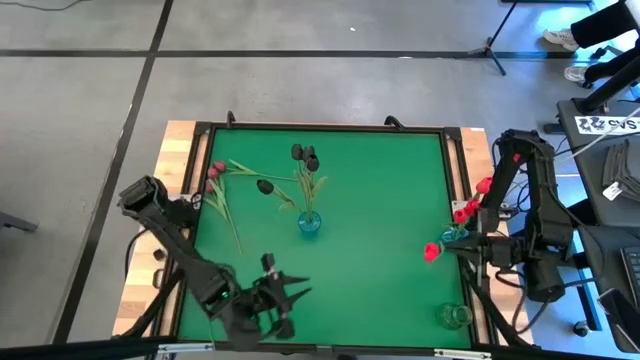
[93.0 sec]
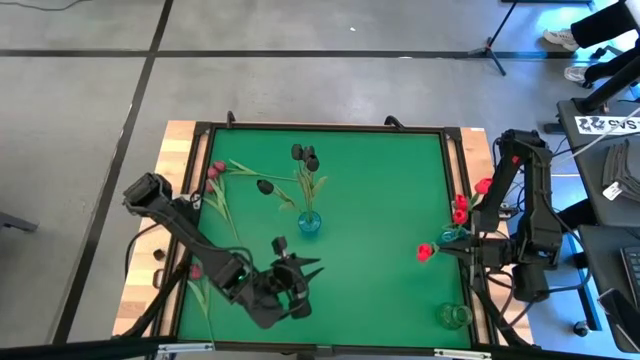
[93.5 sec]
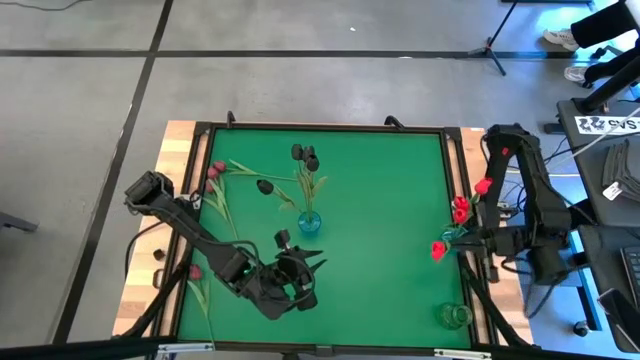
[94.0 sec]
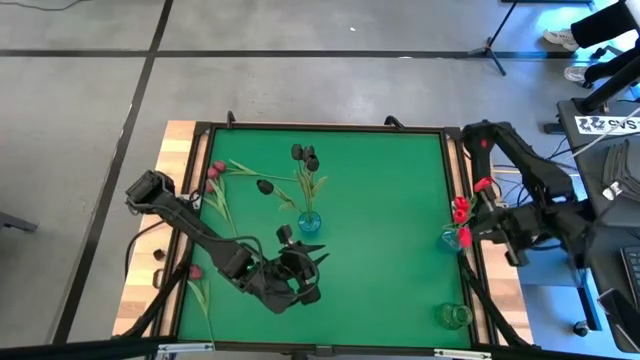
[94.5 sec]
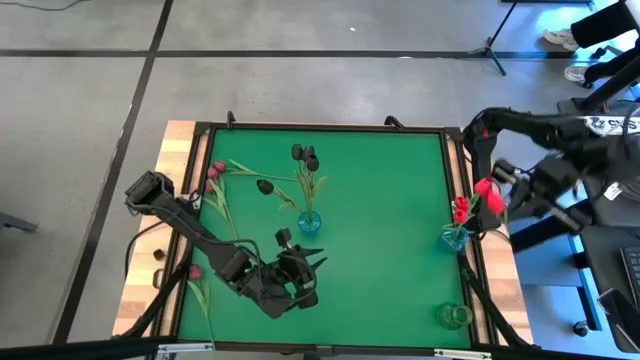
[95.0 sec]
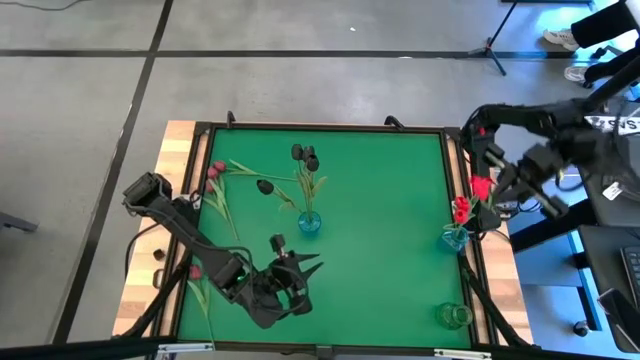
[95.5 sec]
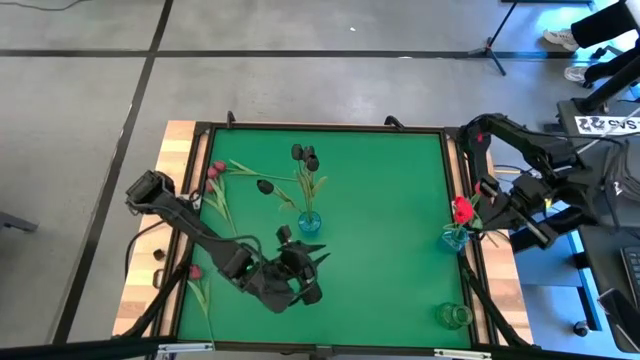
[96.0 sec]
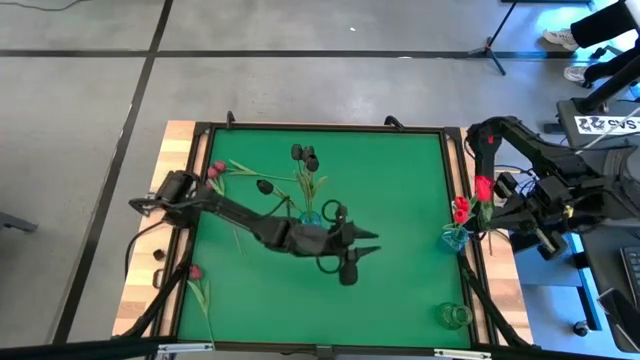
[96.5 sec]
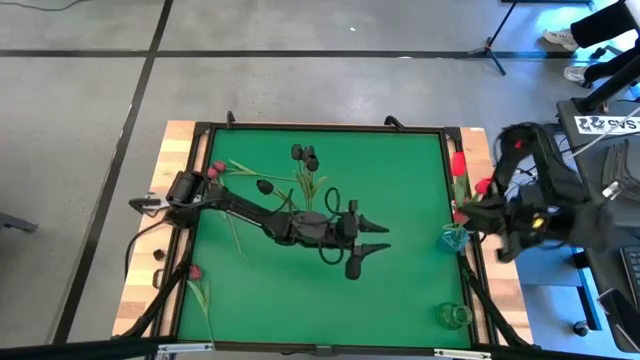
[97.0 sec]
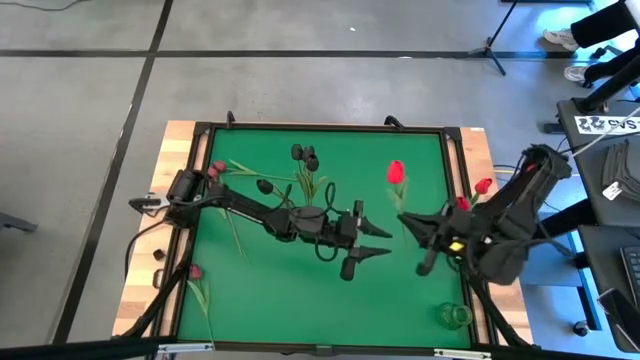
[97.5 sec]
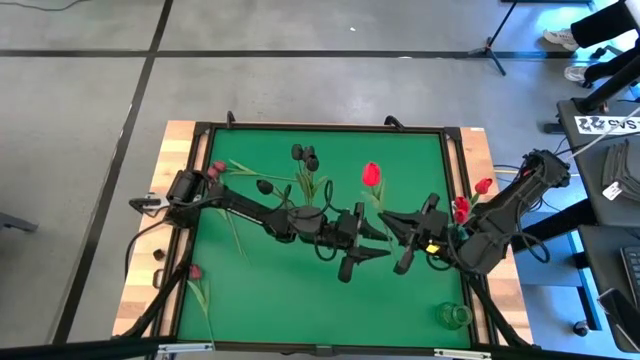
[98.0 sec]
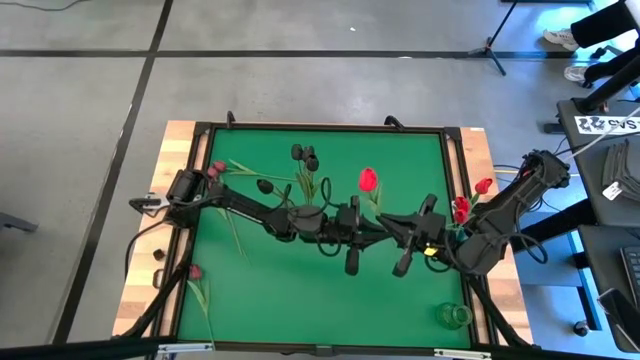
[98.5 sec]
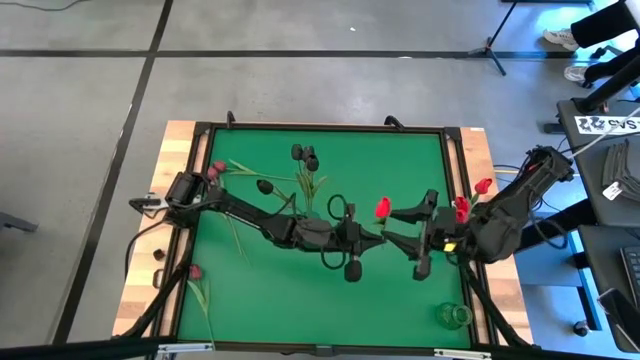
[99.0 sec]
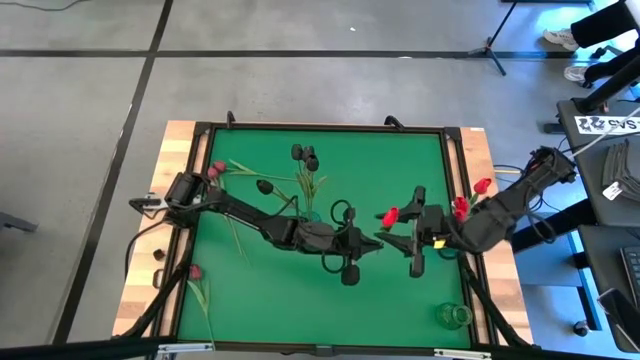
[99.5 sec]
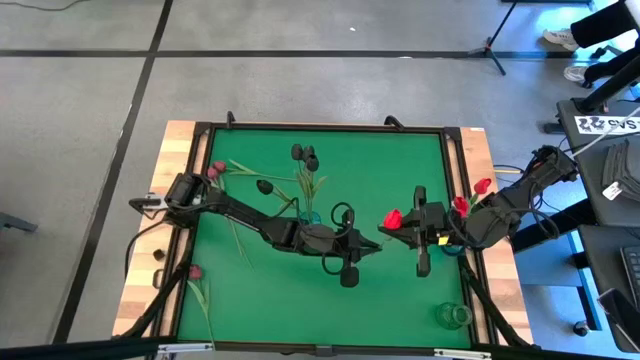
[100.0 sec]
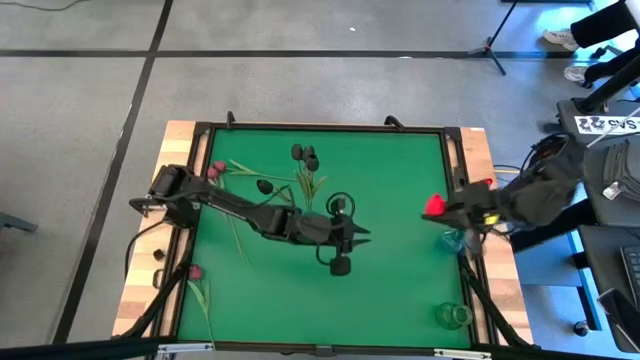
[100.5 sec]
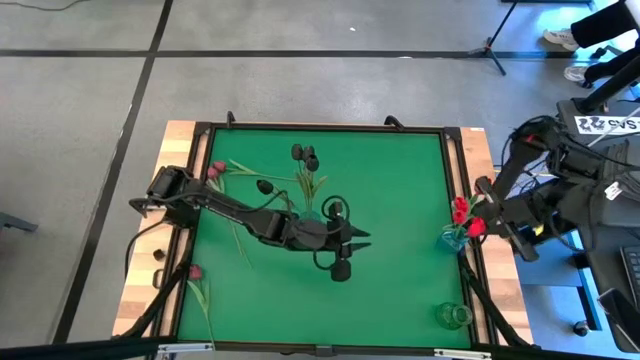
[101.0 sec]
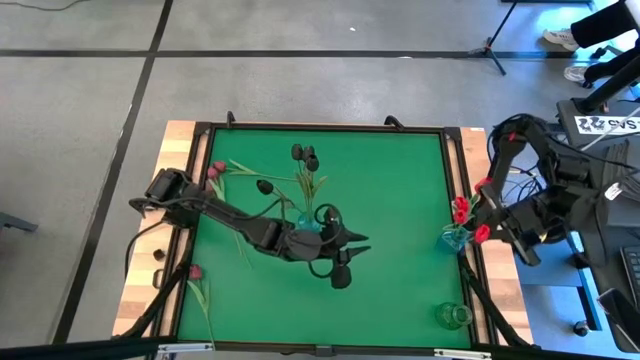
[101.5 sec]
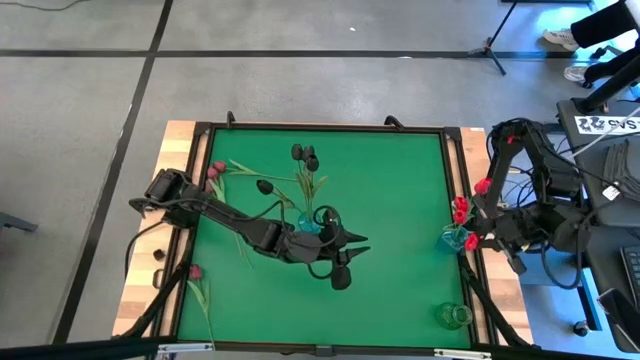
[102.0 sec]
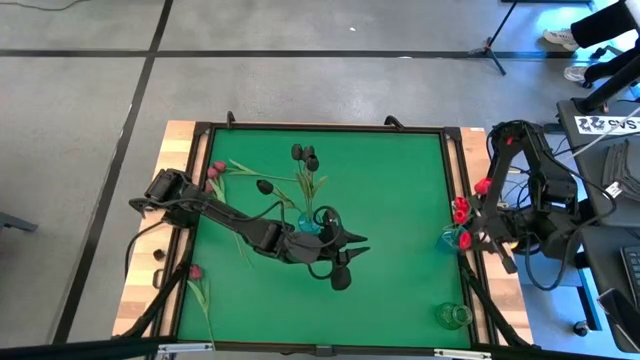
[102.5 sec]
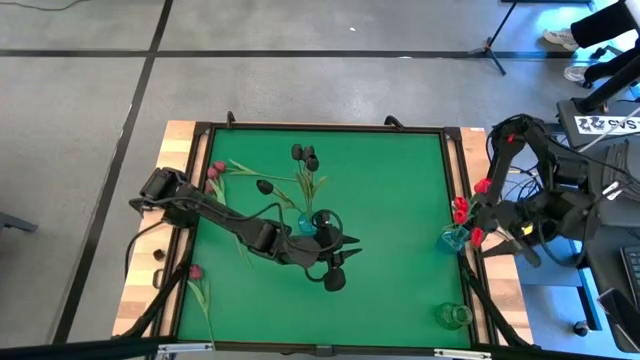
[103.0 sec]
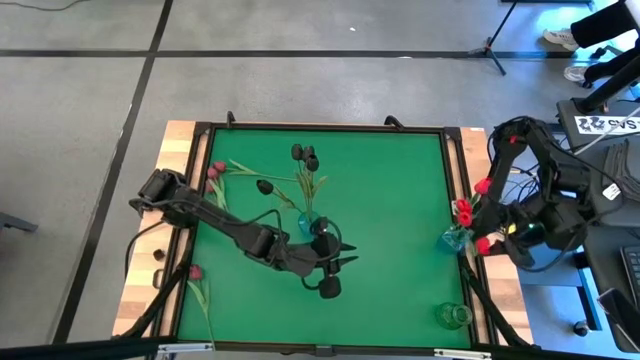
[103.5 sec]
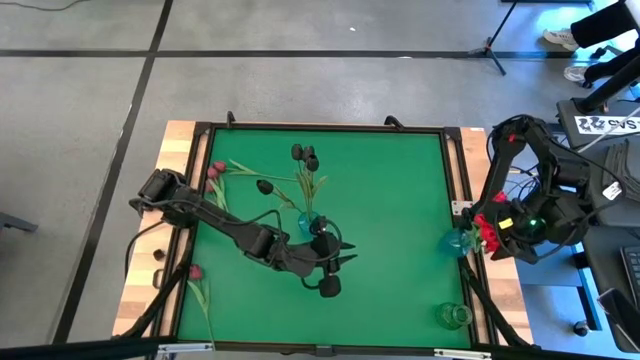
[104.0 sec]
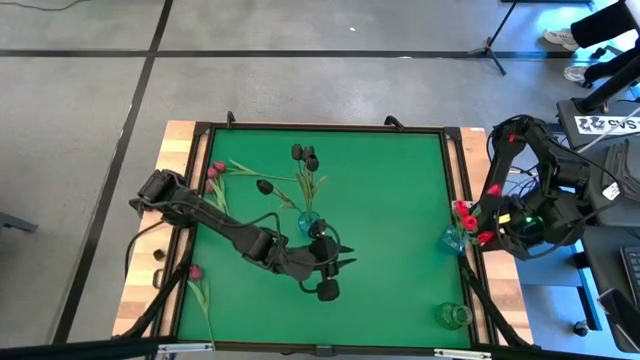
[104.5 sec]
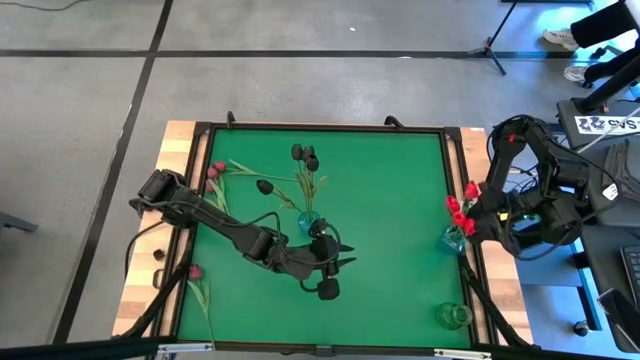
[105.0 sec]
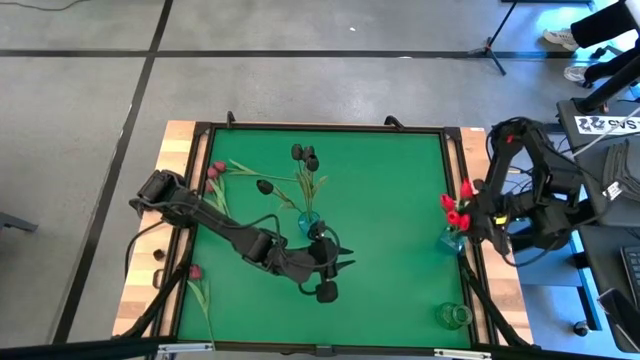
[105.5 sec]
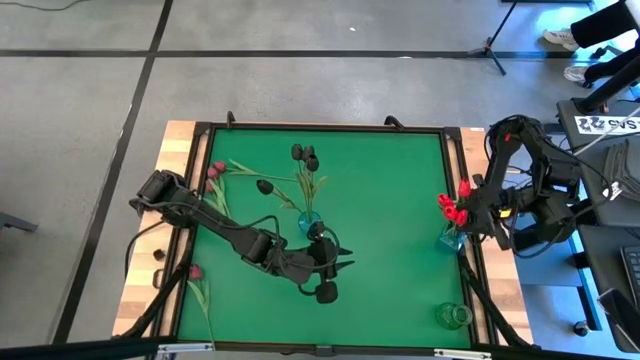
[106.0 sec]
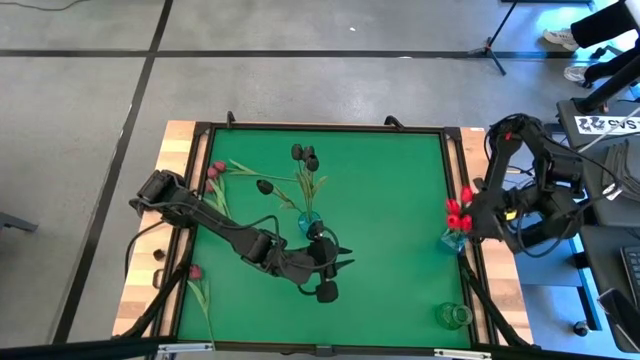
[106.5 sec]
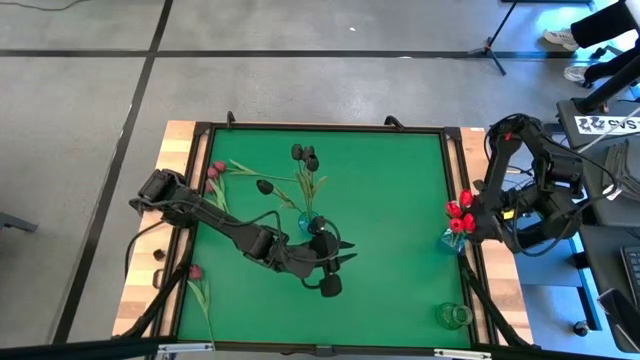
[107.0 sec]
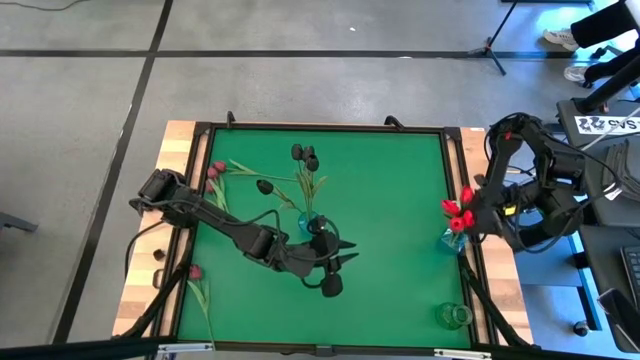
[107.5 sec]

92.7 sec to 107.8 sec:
Task: Sort flowers into vase by color
Put the red flower into the right blue vase

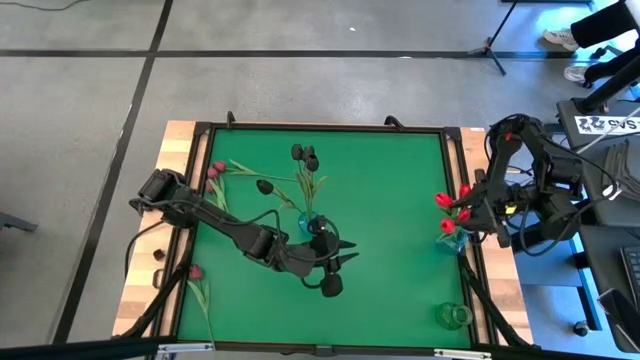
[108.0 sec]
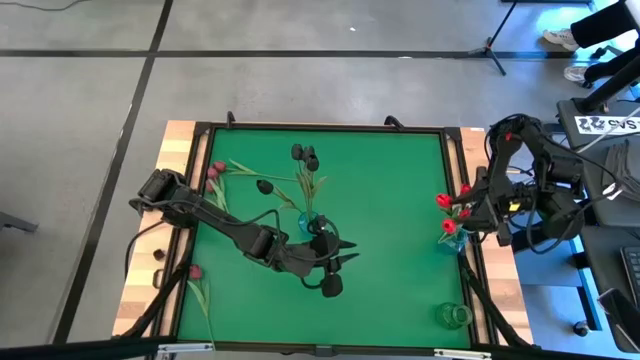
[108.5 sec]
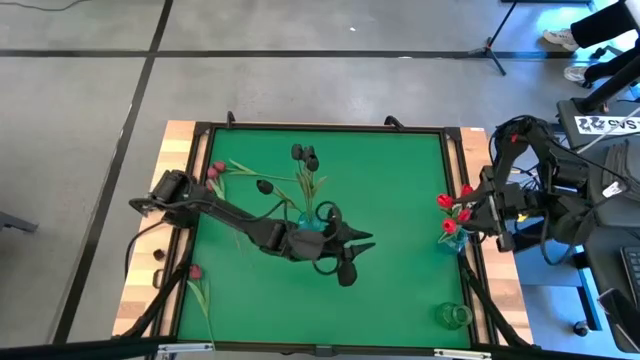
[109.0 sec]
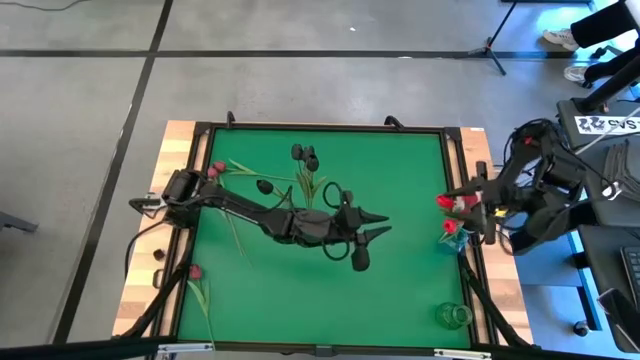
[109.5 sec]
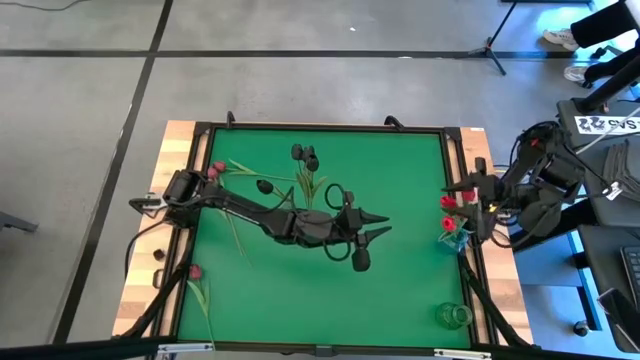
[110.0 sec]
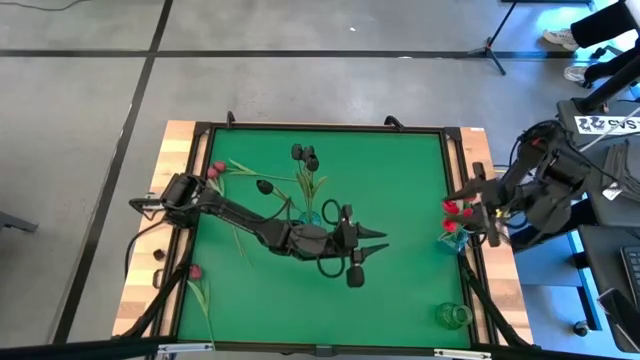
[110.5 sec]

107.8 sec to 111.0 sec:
Adjust the red flowers

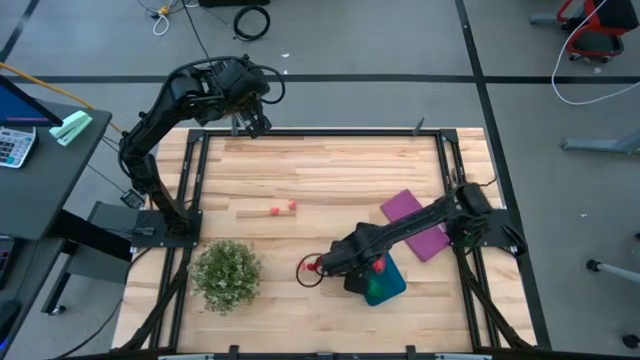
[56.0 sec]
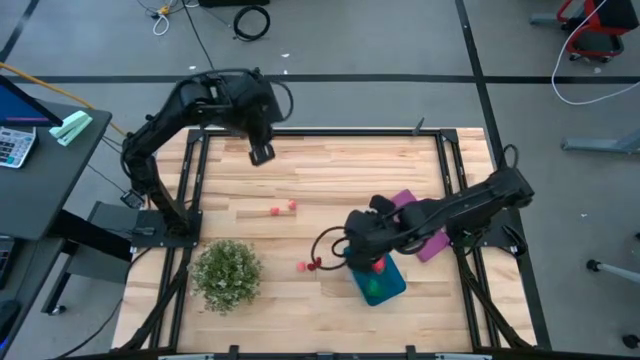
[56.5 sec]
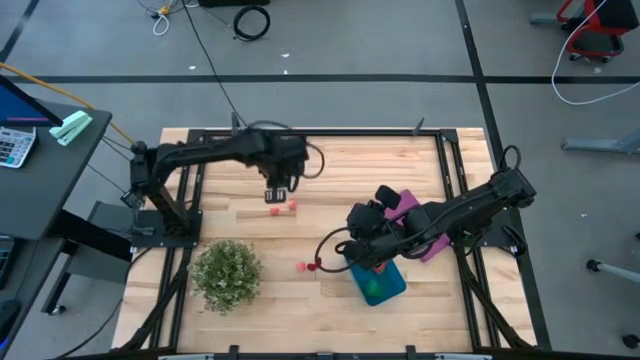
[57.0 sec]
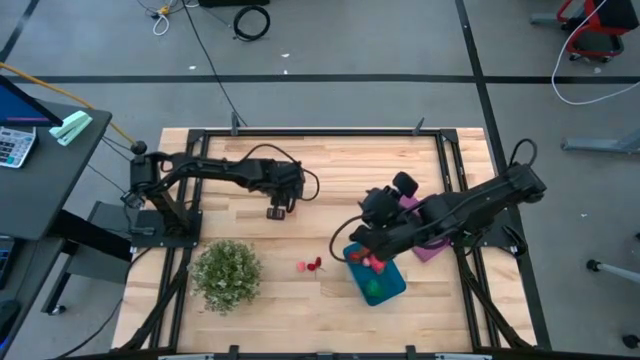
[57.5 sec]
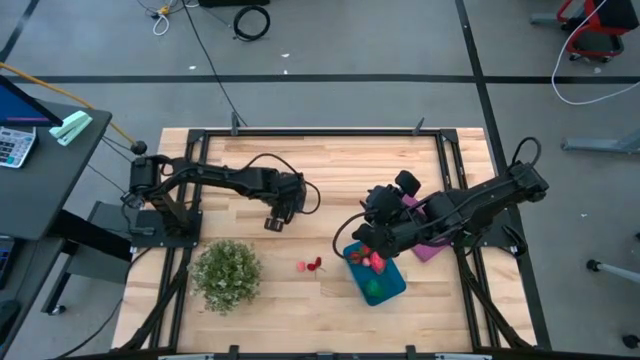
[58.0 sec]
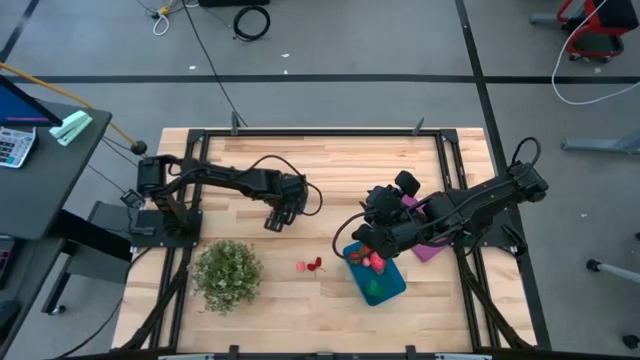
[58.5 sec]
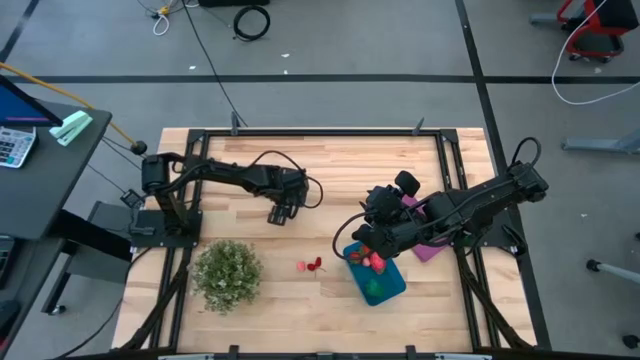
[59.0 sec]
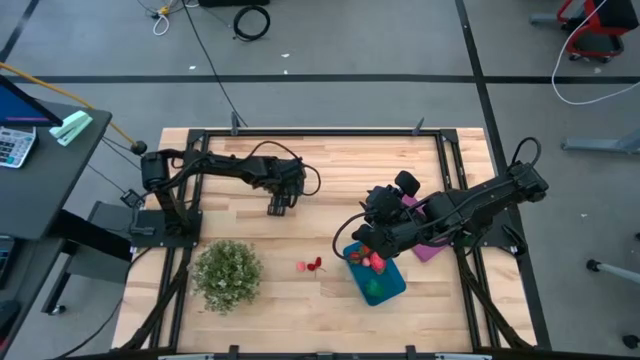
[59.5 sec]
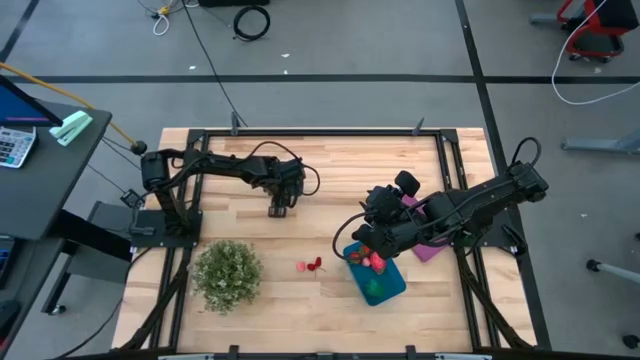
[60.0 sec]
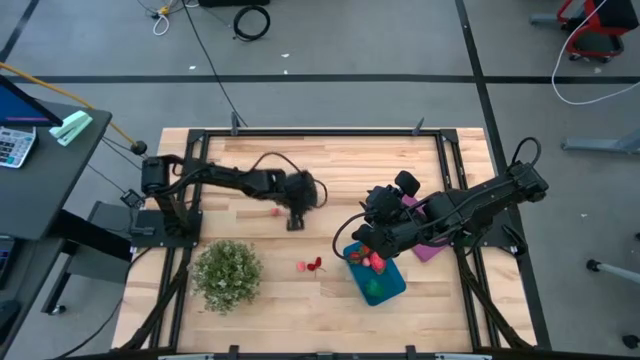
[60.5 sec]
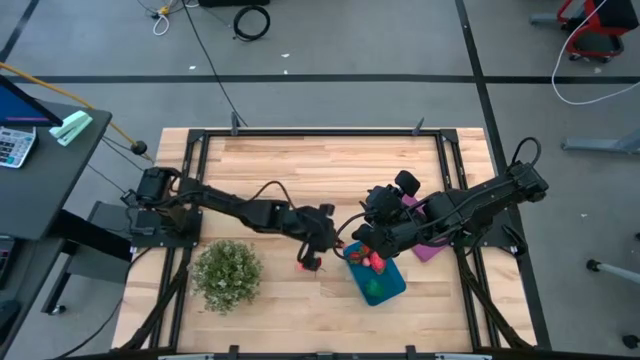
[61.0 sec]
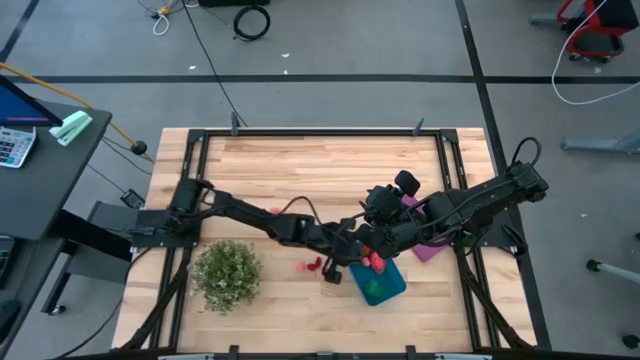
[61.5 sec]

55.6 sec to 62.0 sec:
Task: Pick and placing Produce into tupperware
Put the pink peach into the blue bin
